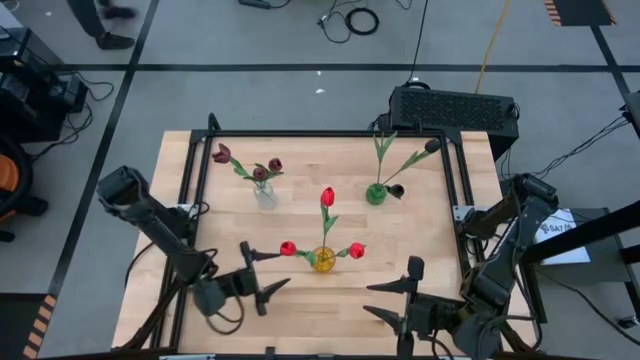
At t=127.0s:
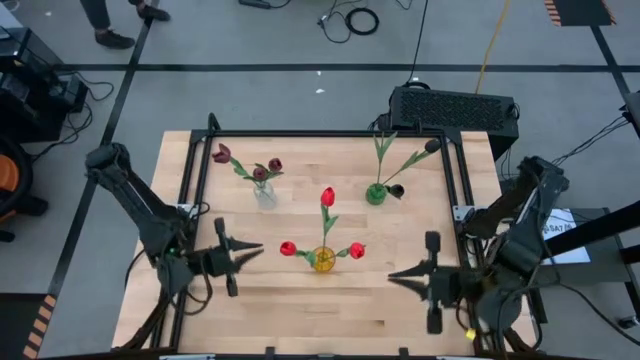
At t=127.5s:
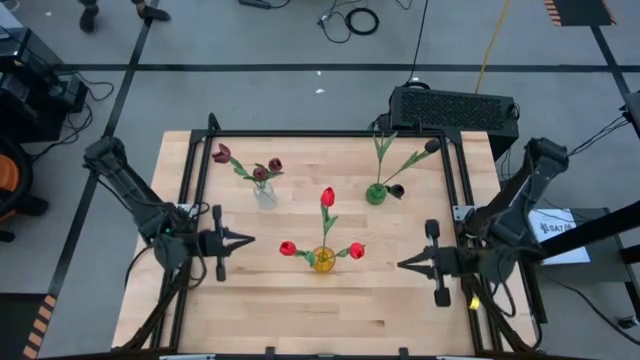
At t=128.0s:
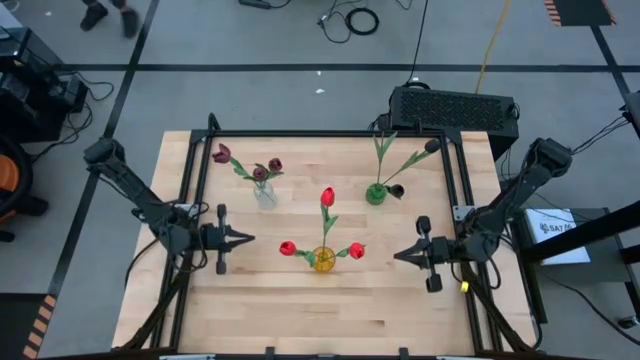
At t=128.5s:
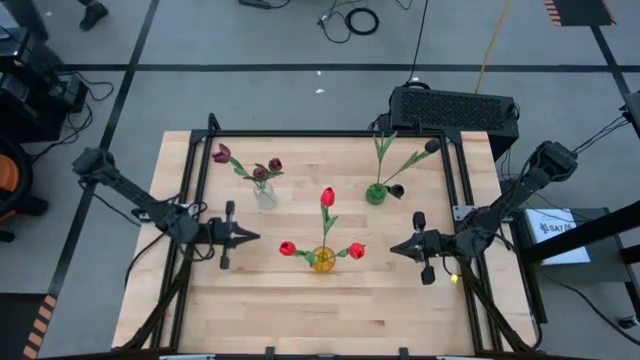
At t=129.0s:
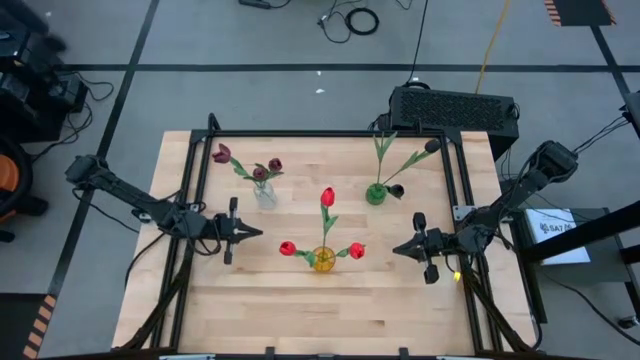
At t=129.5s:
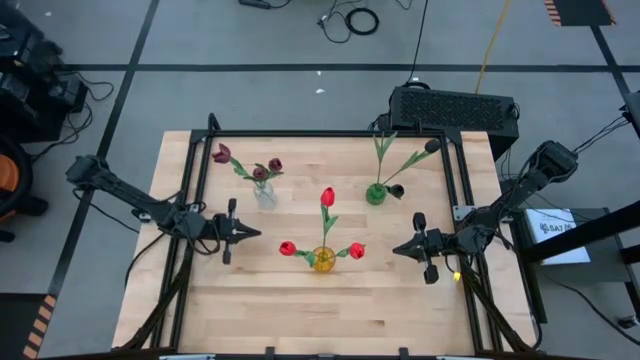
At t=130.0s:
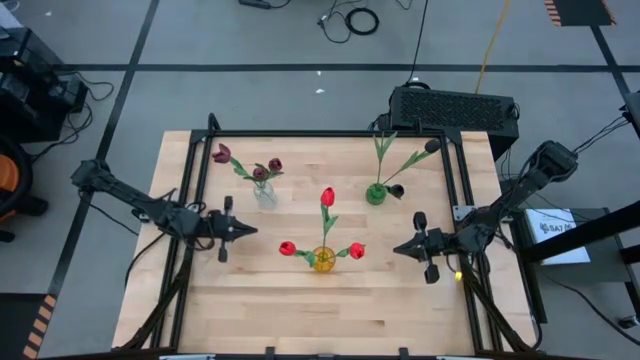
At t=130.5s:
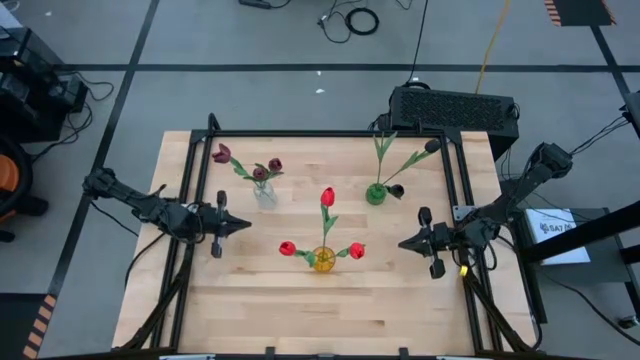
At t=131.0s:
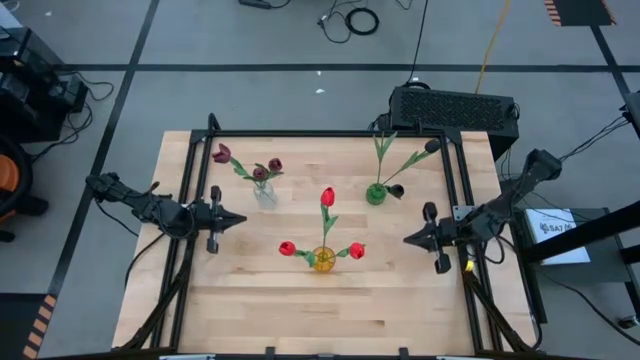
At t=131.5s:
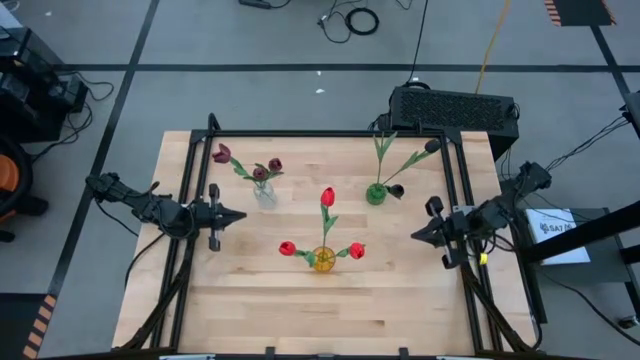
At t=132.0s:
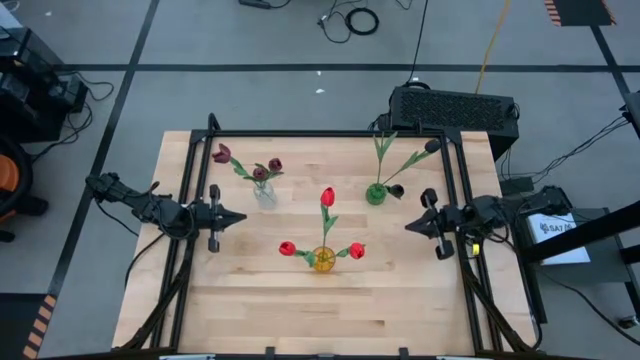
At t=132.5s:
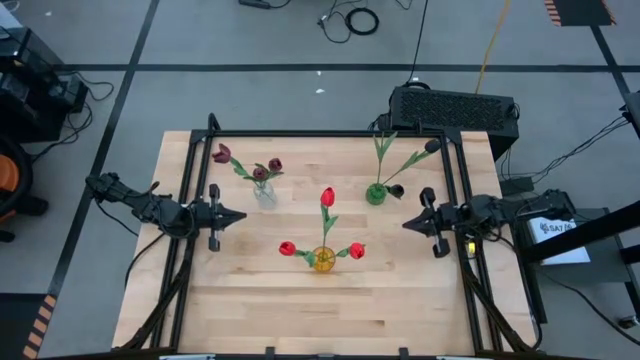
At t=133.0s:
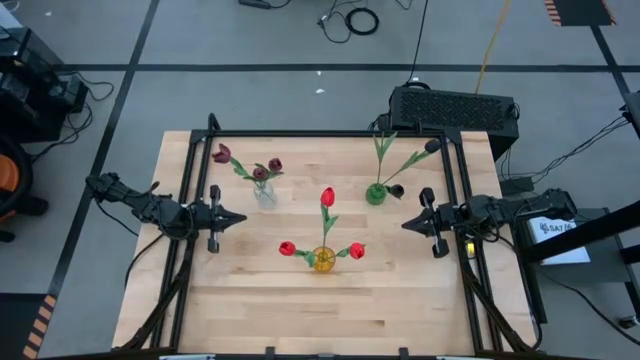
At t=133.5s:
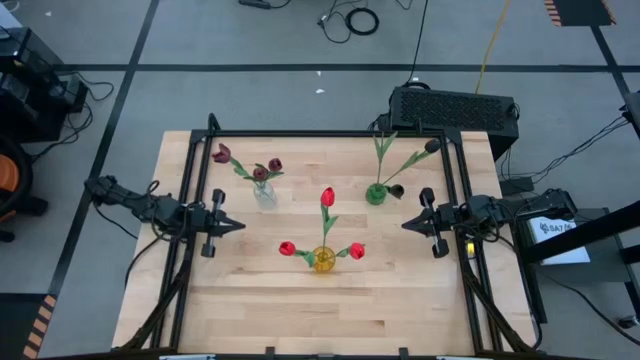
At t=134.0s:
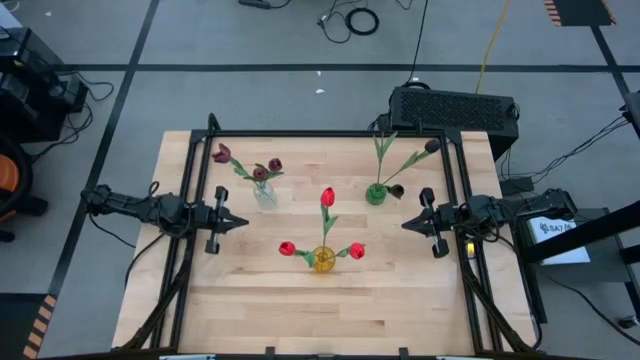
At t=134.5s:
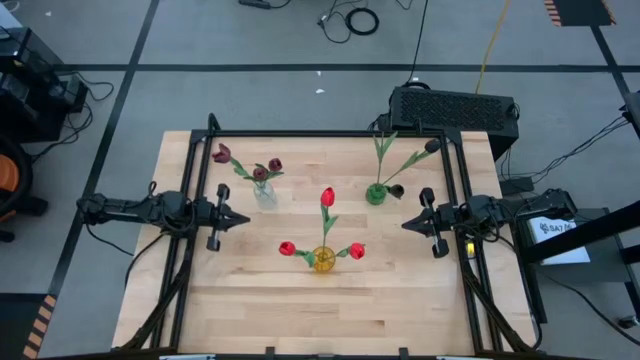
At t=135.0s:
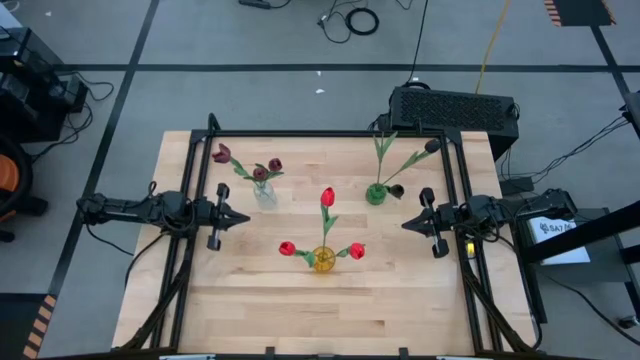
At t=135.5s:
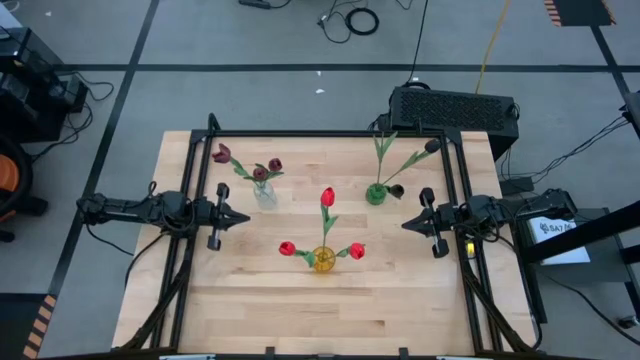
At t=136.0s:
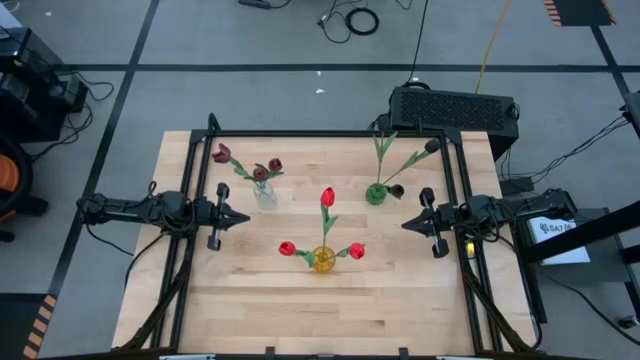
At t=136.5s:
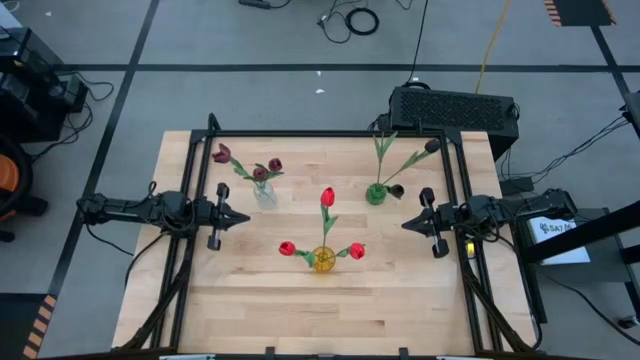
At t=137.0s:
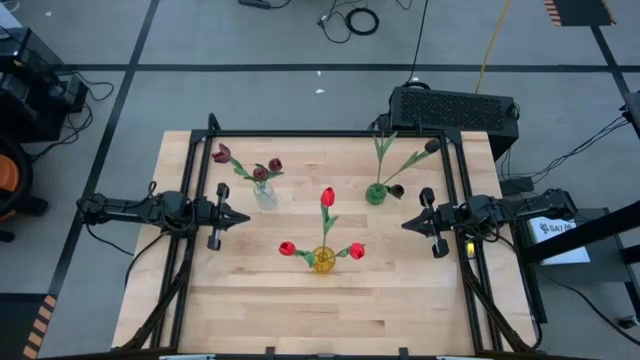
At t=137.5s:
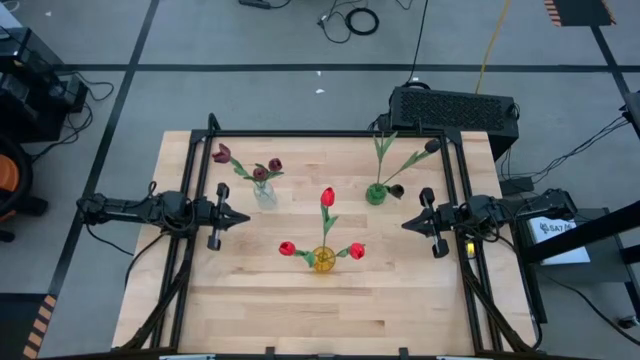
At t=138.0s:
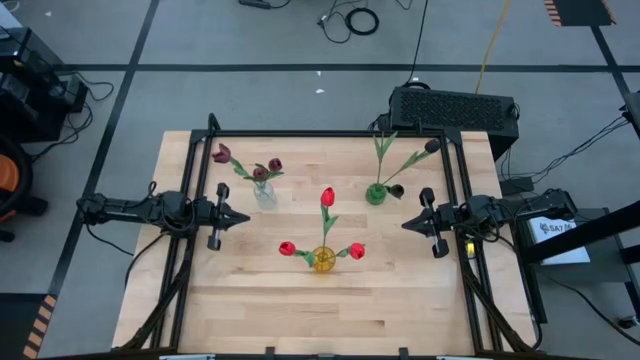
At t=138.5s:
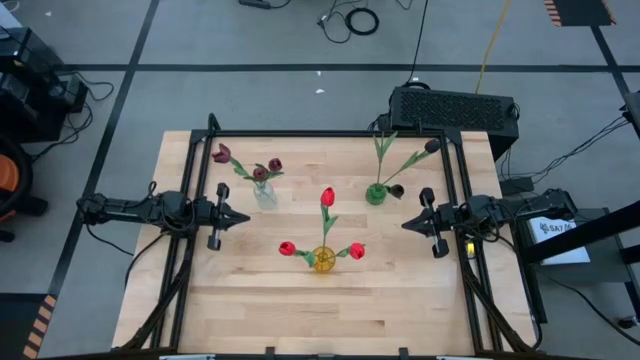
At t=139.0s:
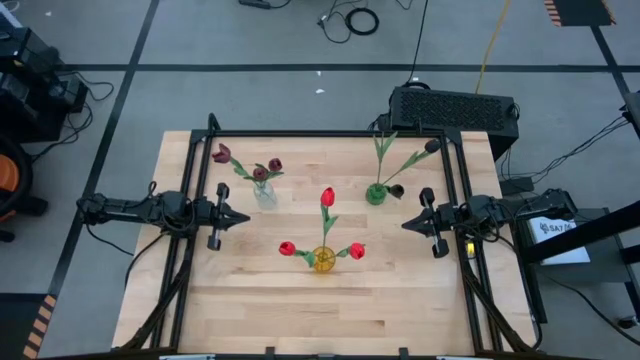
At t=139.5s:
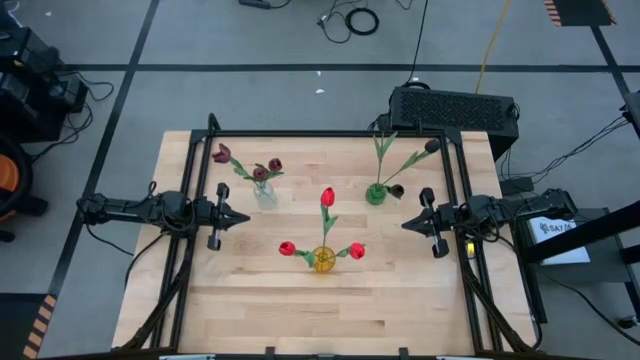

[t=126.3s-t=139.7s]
Task: Sort flowers into vase by color
Return to Home position

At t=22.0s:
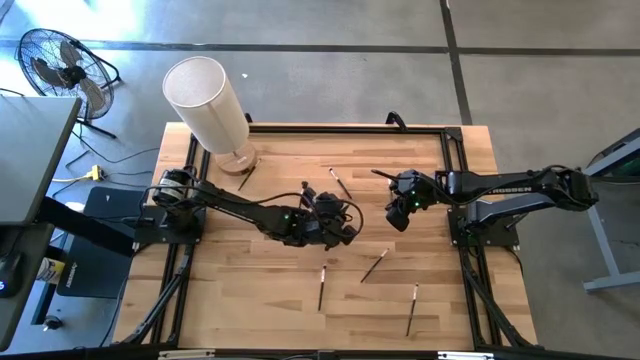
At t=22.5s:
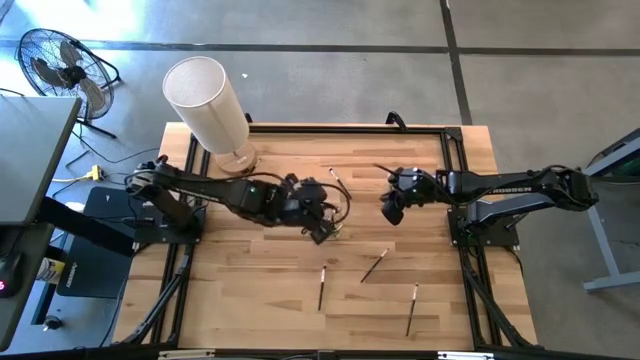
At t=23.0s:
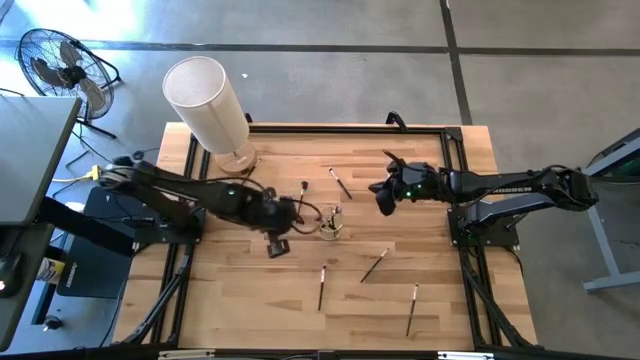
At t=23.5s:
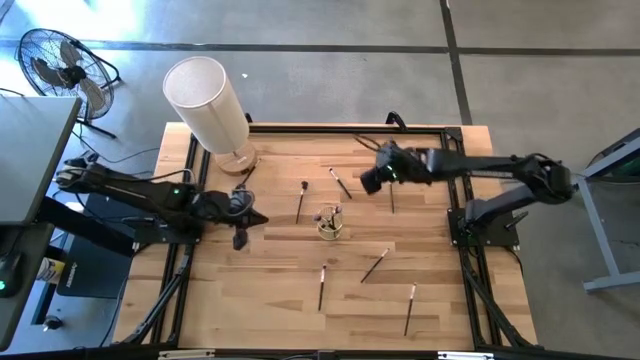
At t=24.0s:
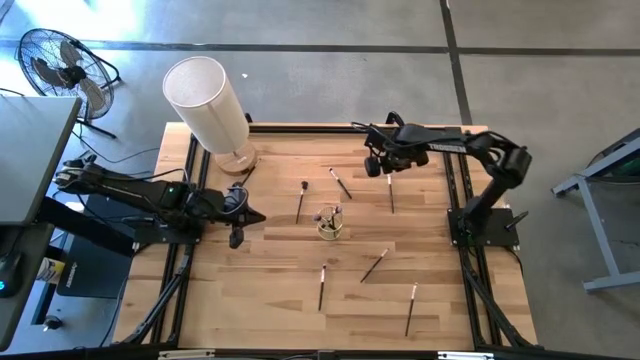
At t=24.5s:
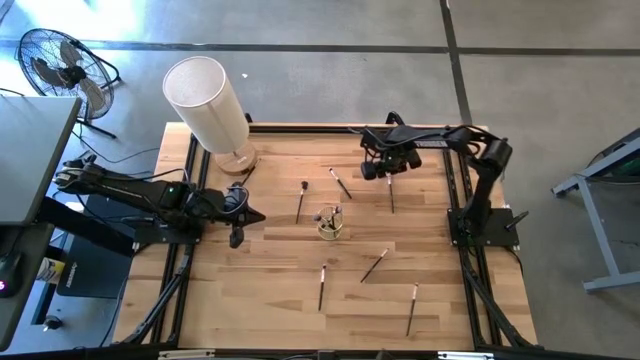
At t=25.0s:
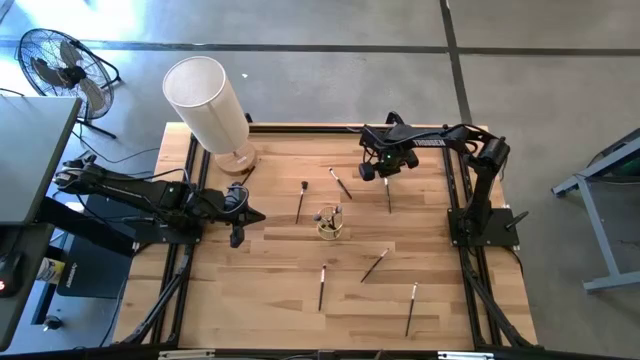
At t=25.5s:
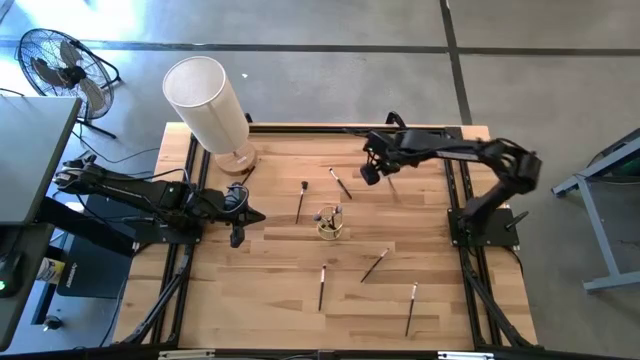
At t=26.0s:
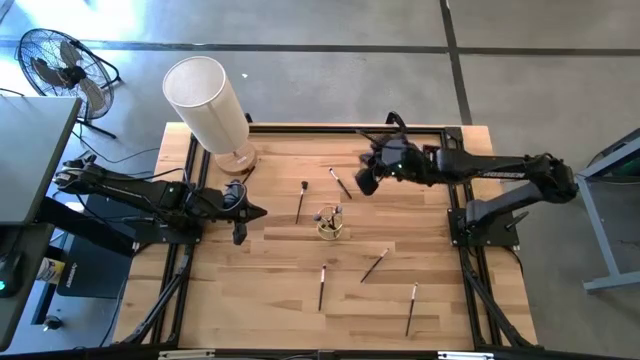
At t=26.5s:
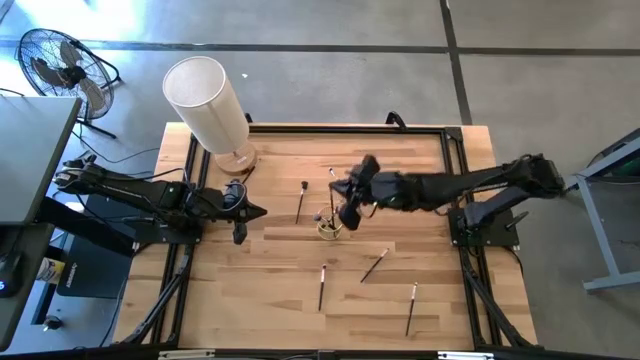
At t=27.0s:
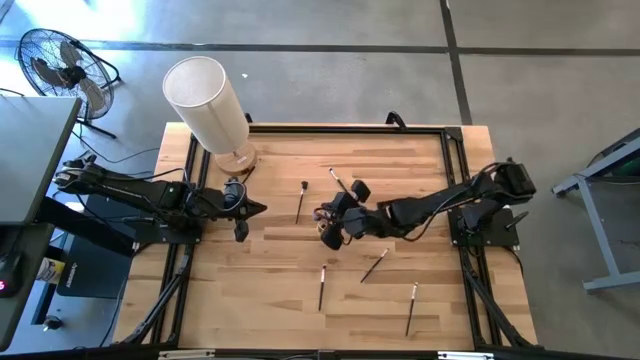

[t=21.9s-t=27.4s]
Task: Put items in baskets/containers
Put the eyeshadow brush into the wire organizer

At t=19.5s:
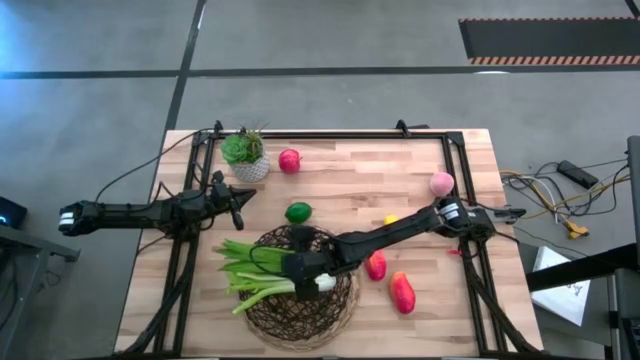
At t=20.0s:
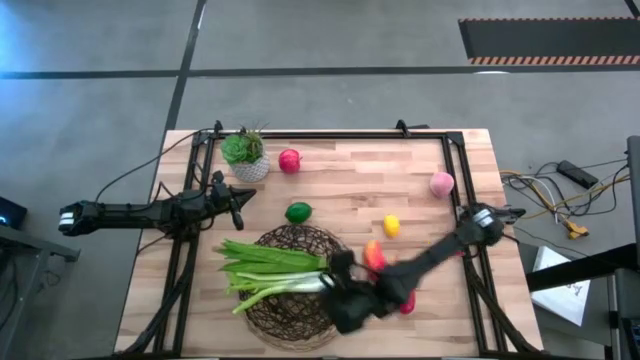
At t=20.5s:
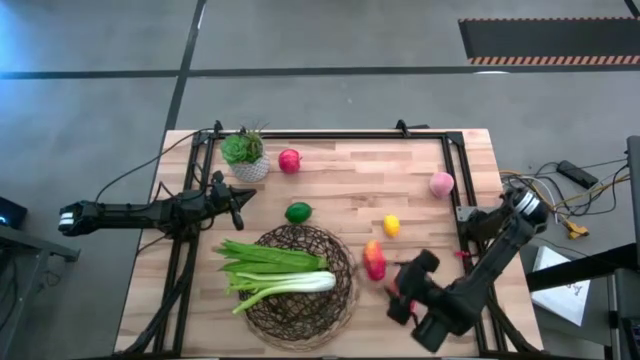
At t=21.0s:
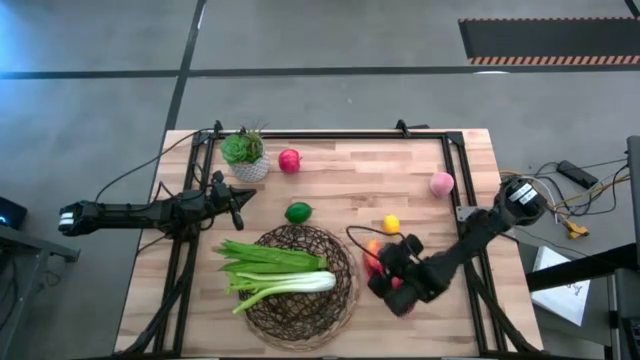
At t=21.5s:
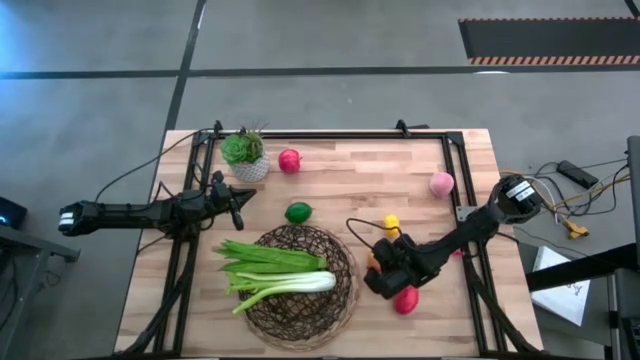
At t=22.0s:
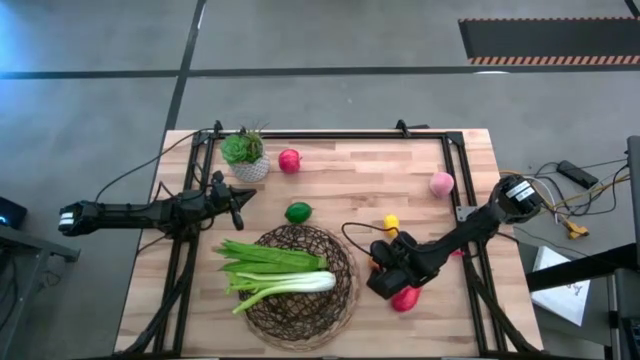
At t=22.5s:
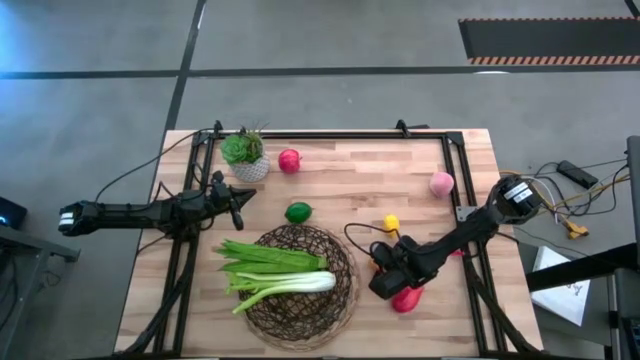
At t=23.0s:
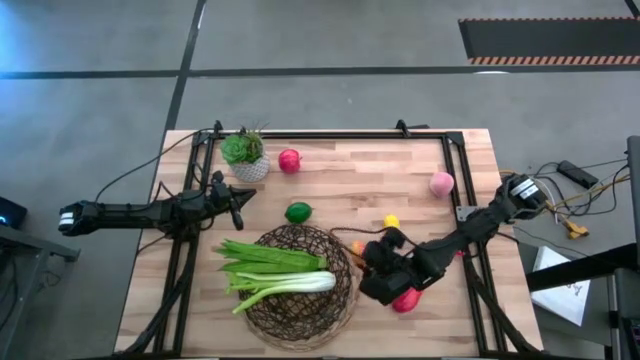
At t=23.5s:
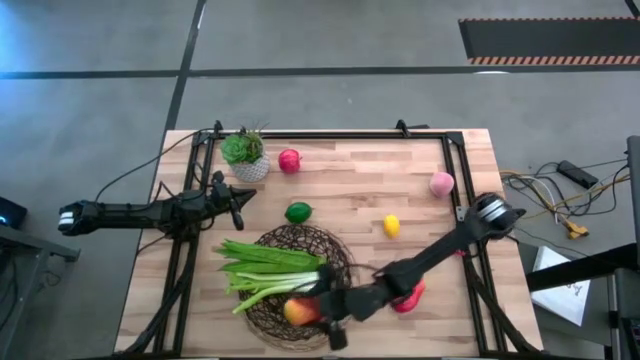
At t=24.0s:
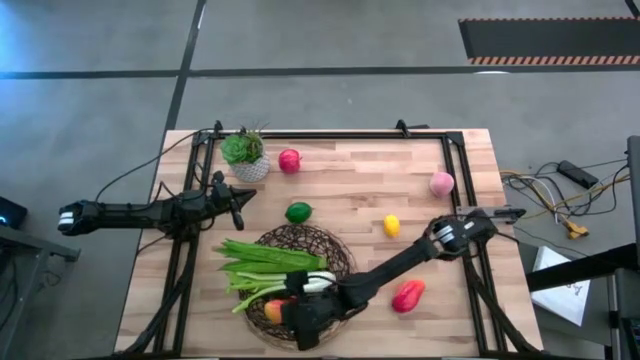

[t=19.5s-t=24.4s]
Task: Build produce basket
Put the top mango into the mesh basket
